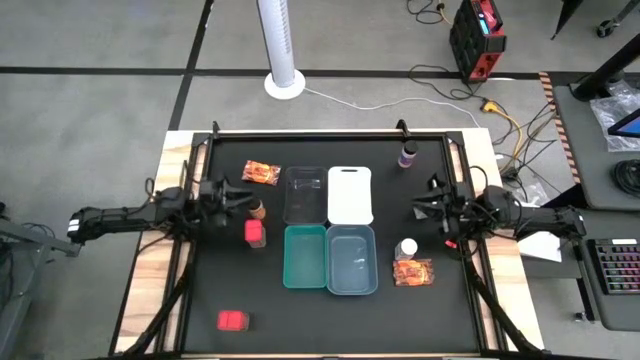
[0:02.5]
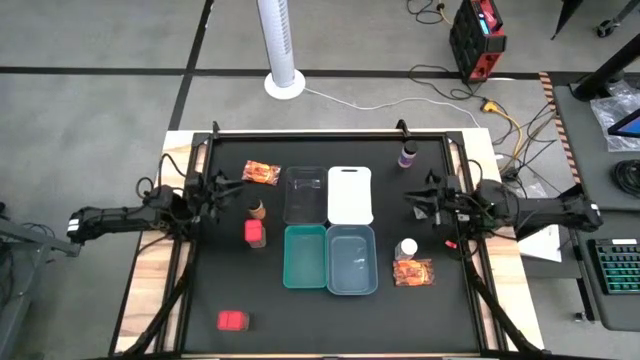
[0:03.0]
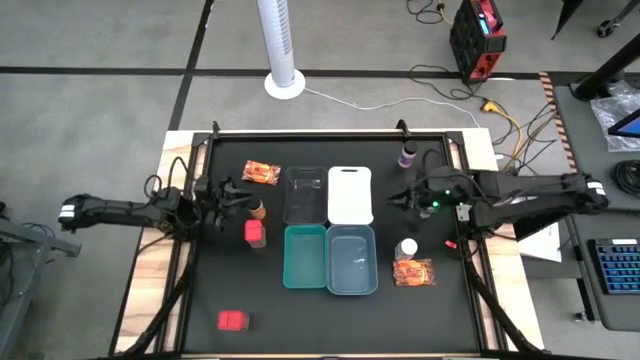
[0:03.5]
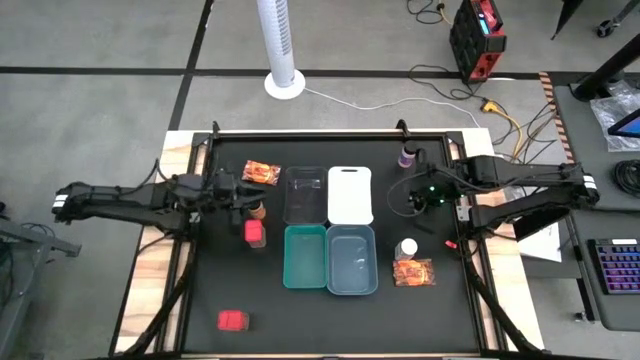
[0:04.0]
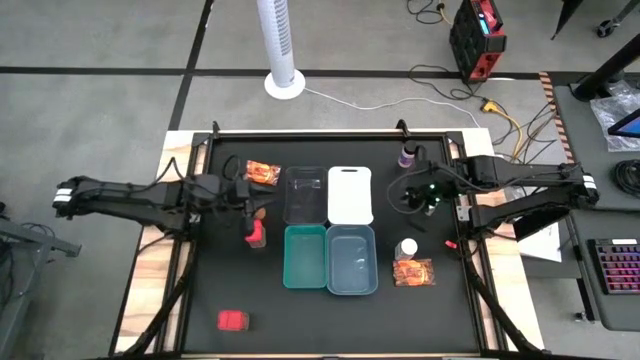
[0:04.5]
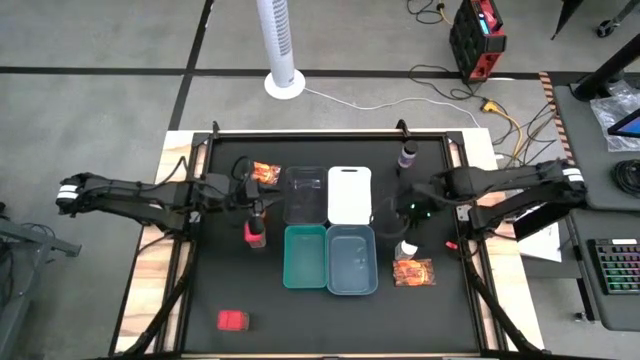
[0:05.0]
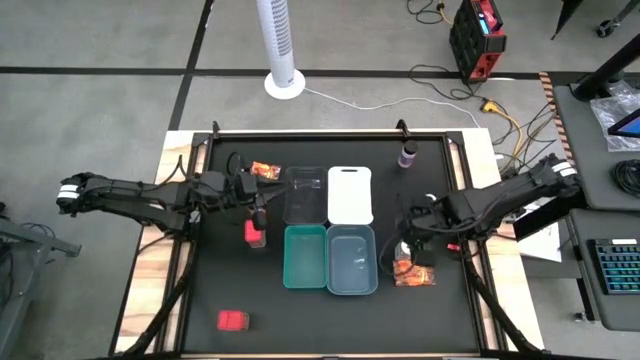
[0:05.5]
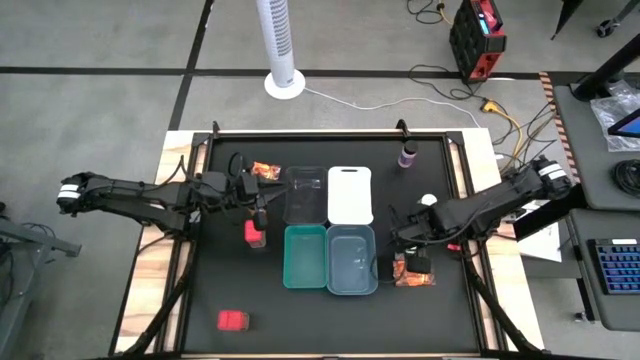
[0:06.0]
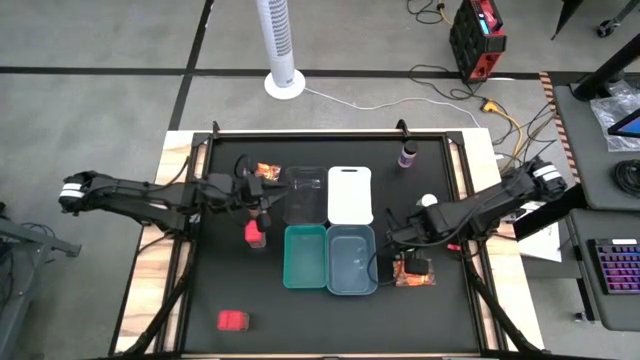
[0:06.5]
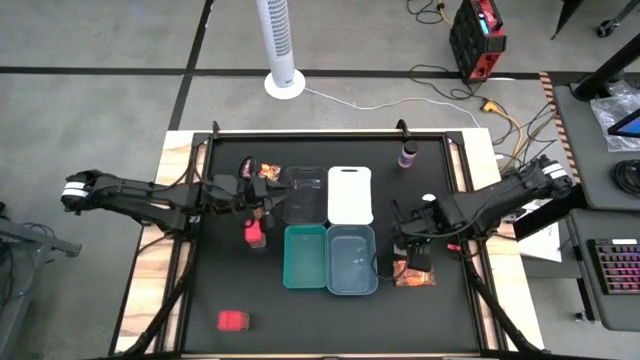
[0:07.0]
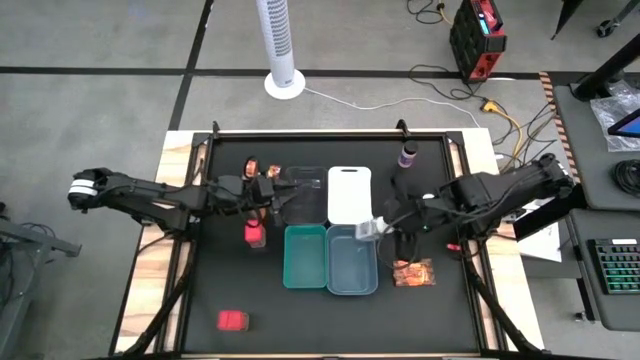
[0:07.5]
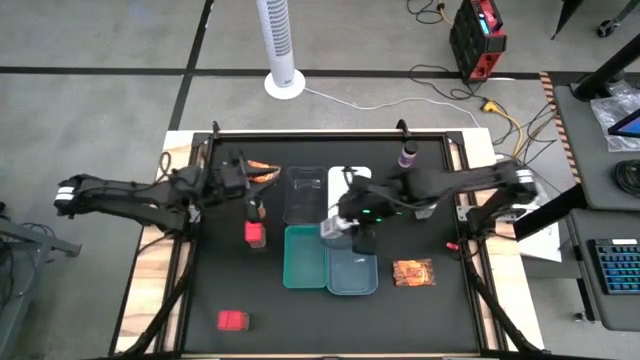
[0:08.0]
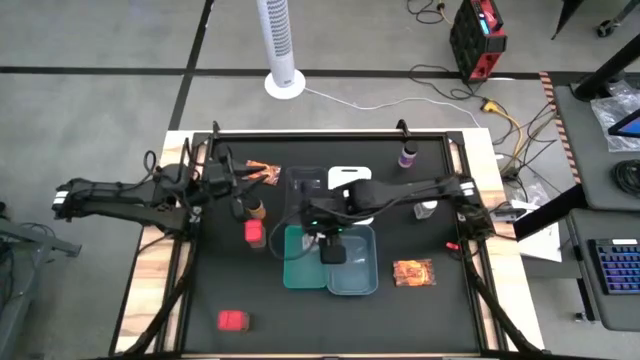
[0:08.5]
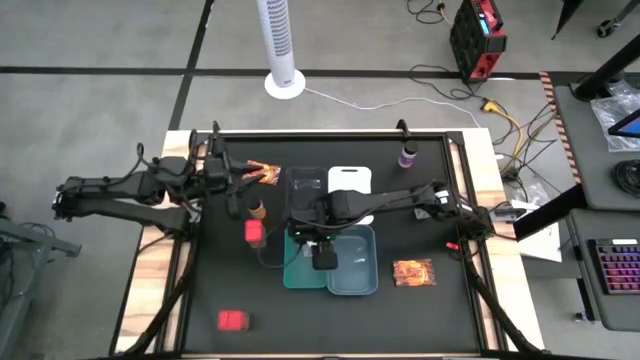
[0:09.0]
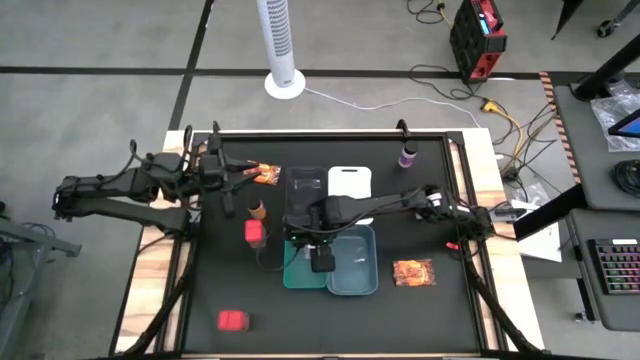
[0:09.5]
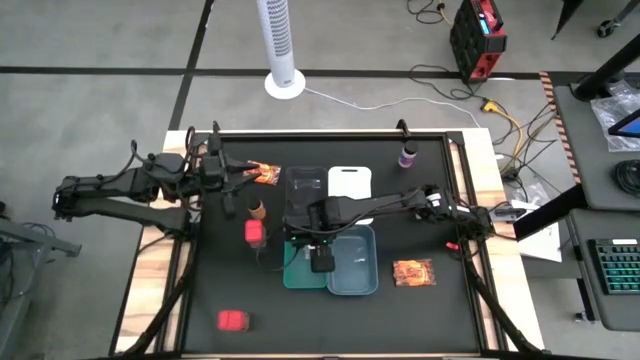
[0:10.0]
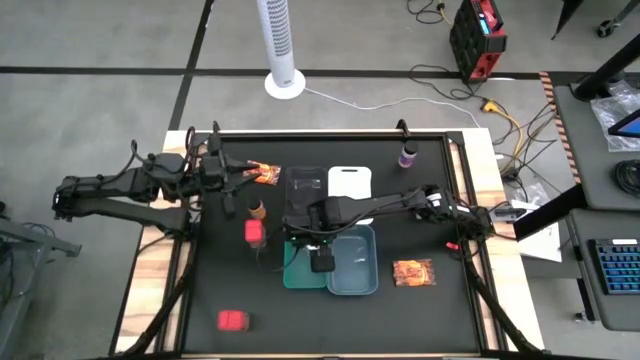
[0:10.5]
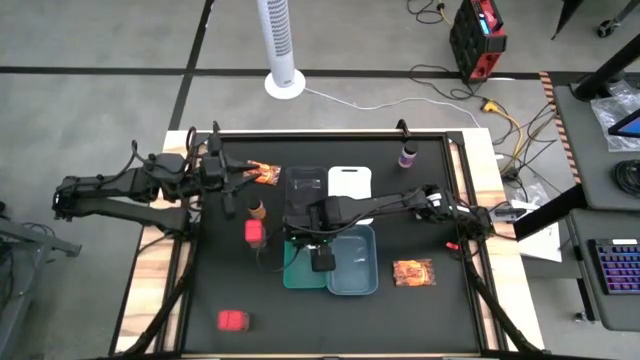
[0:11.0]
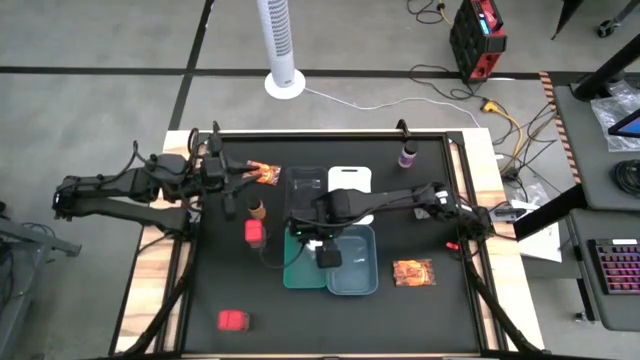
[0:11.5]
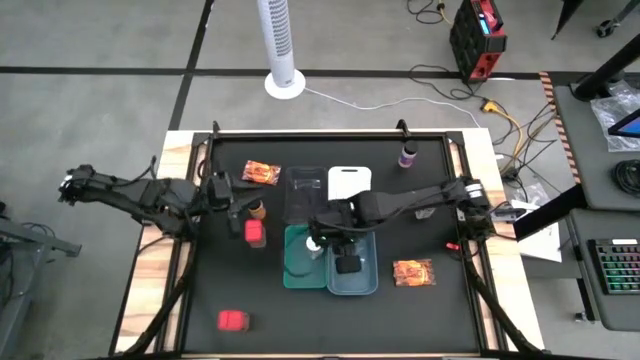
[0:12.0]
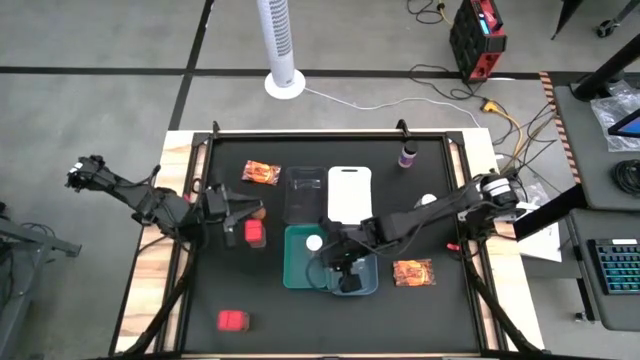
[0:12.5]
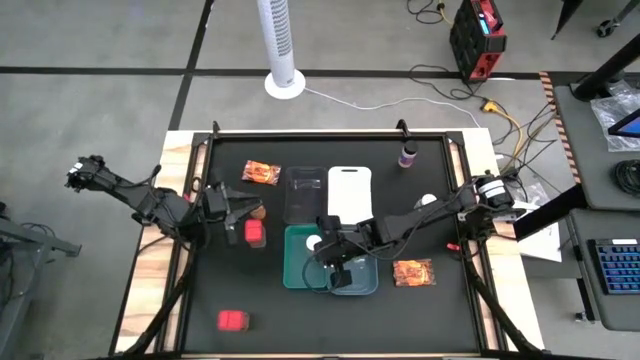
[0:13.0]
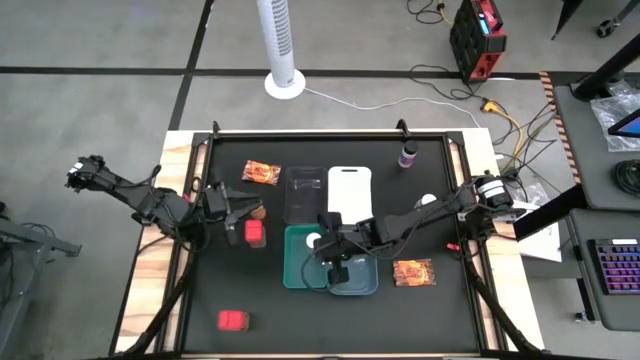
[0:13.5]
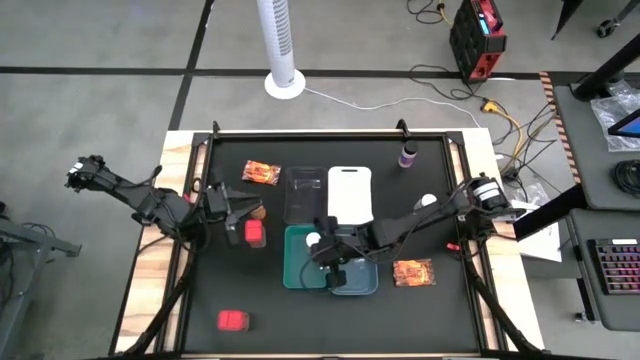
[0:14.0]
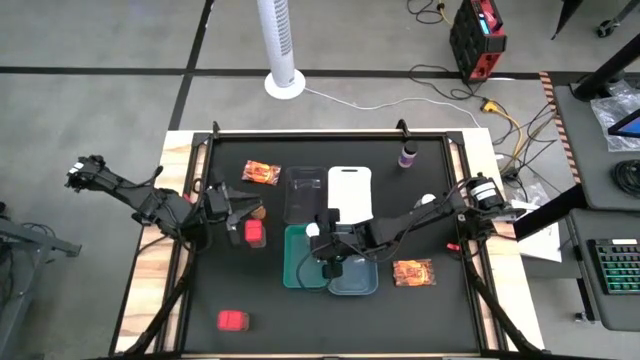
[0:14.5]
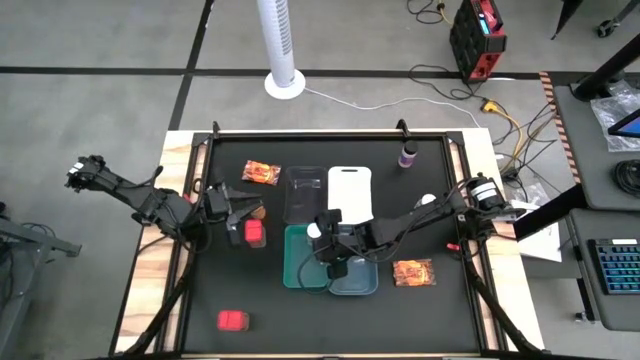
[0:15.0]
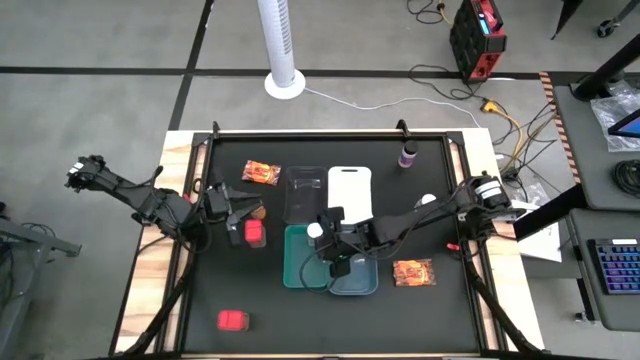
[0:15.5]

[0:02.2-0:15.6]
Task: Sort spices by type
Put the bottom white seasoning bottle into the green bin

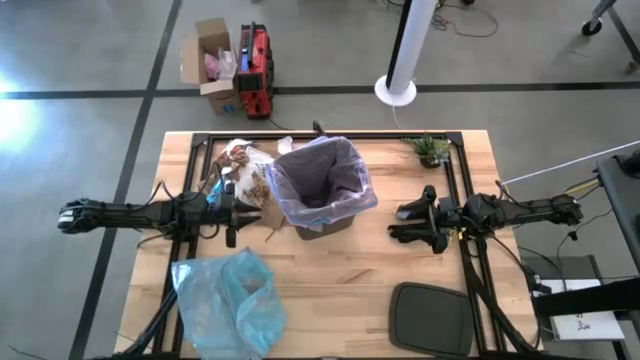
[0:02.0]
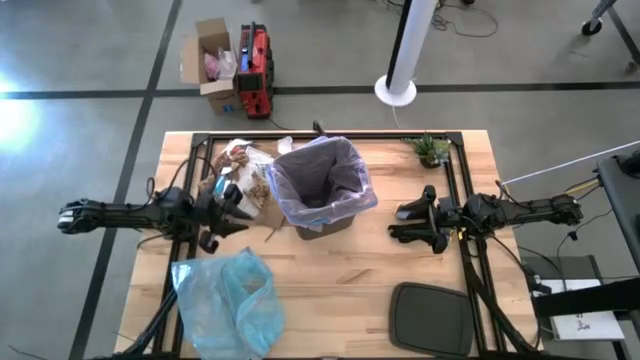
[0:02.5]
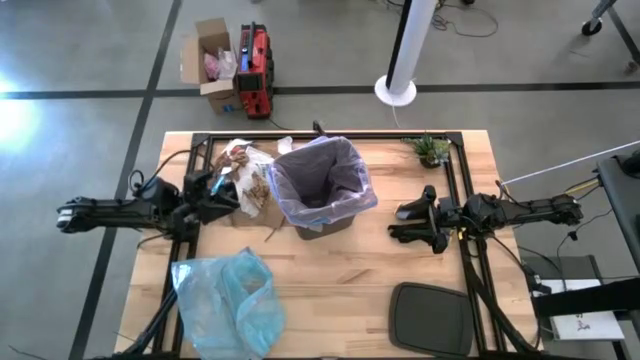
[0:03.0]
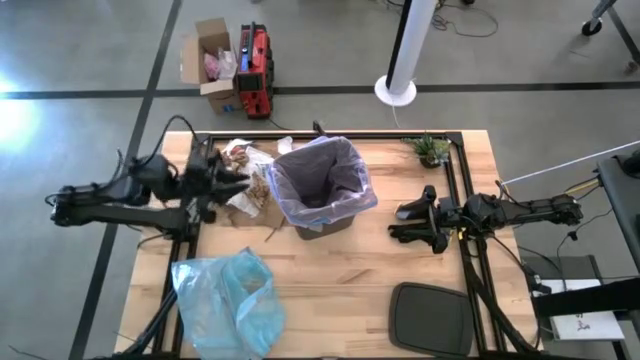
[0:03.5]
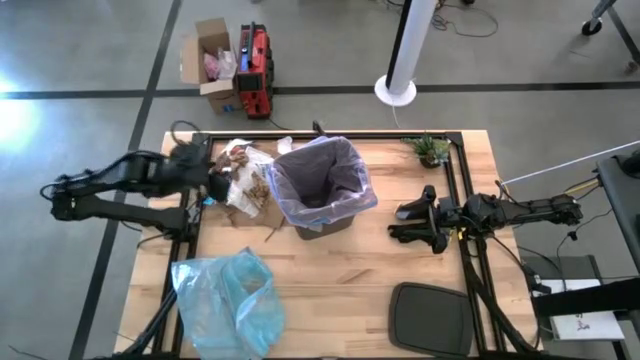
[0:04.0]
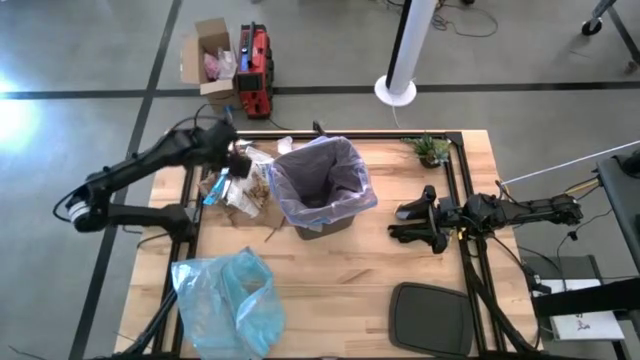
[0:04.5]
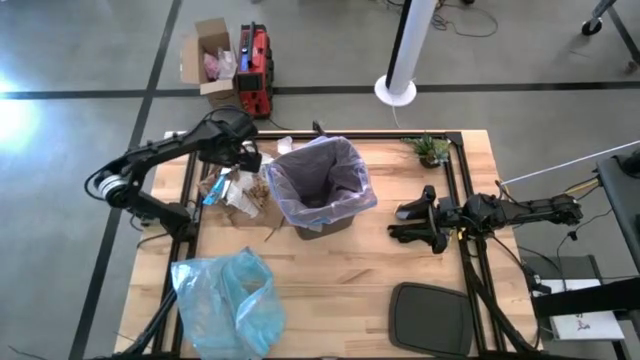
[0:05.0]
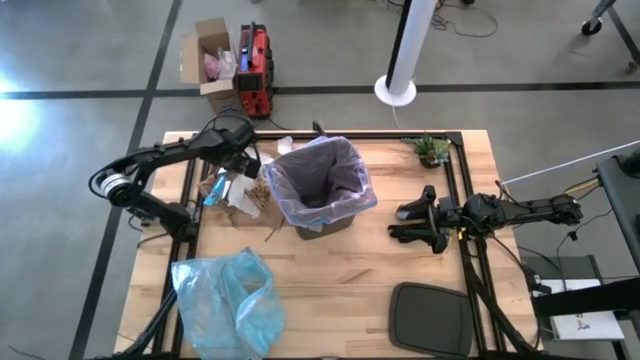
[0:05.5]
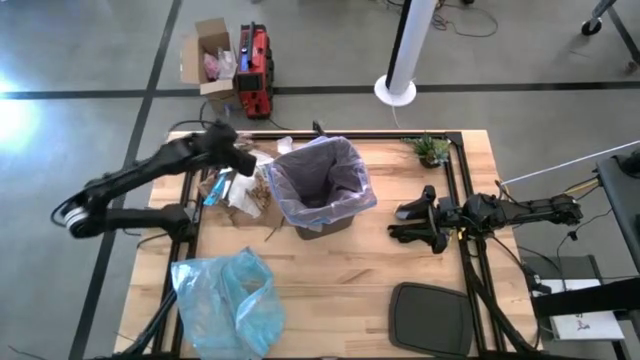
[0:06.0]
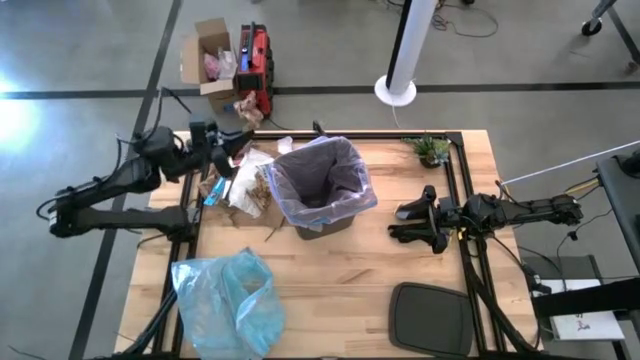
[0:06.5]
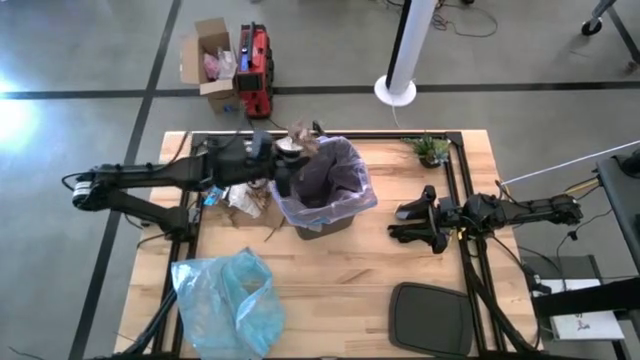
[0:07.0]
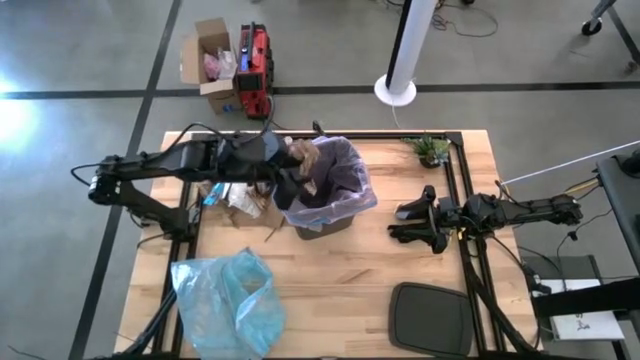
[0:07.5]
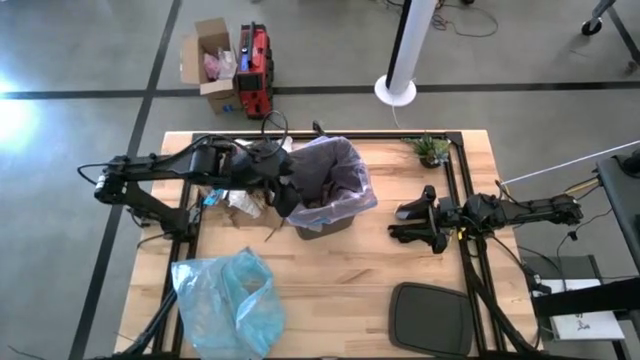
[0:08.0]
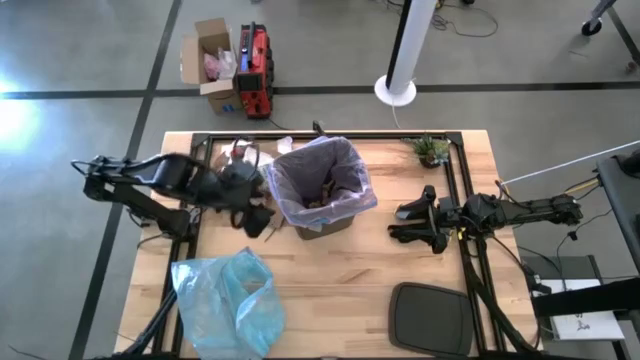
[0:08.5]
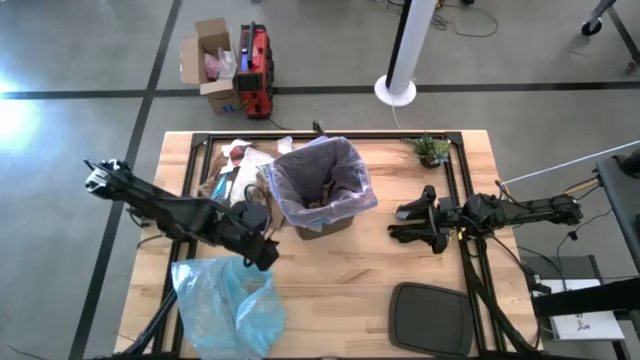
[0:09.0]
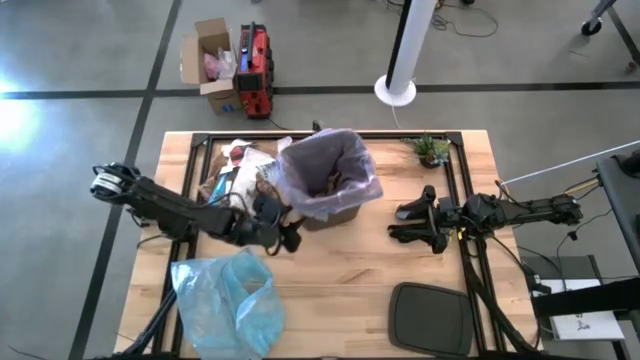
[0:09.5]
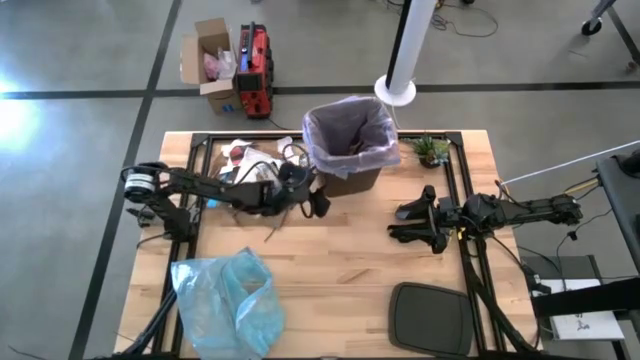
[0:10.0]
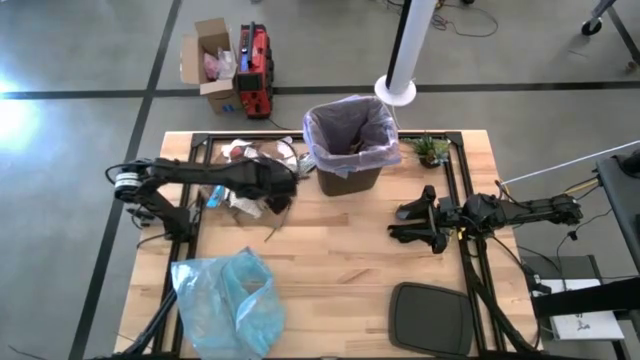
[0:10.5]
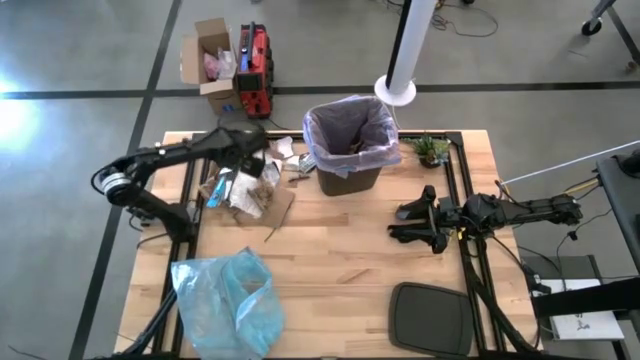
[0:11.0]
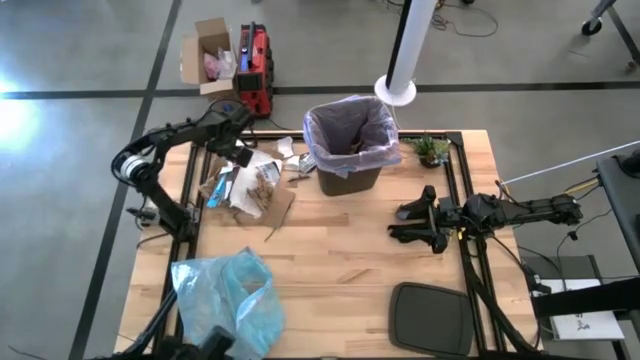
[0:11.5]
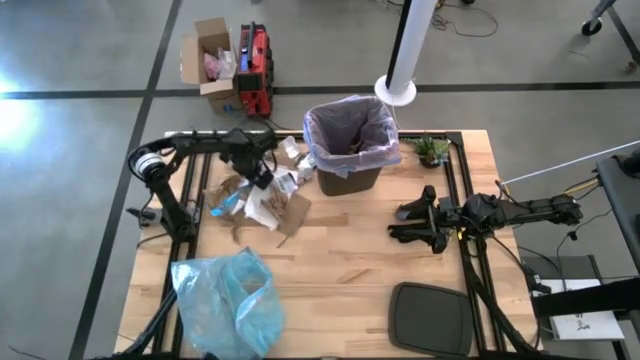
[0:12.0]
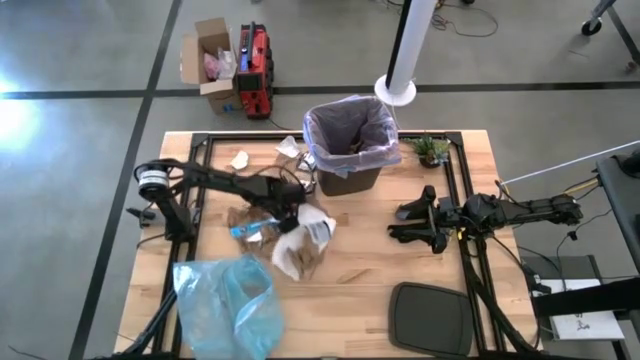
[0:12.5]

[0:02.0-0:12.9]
Task: place trash/remove bag and relplace
Put the brown paper into trash bin
